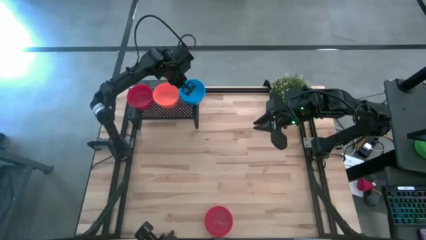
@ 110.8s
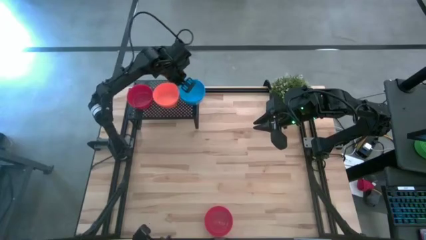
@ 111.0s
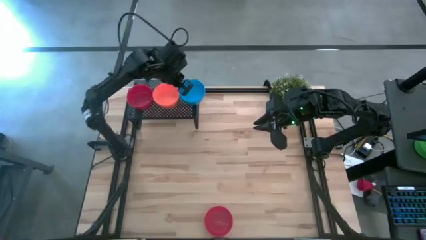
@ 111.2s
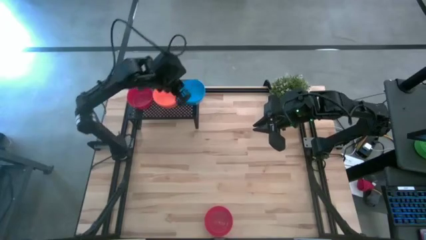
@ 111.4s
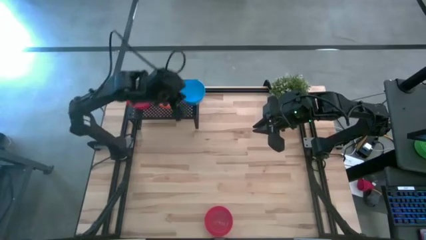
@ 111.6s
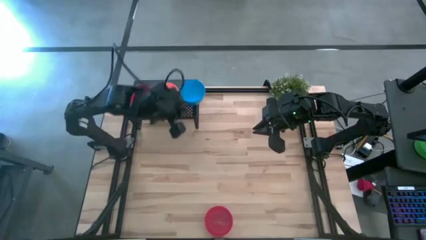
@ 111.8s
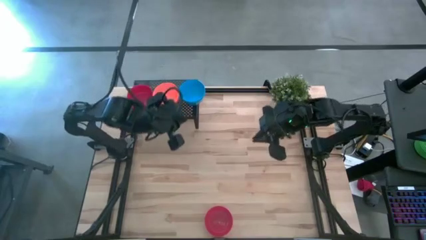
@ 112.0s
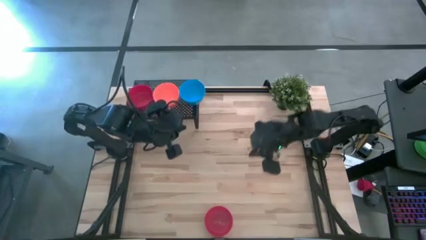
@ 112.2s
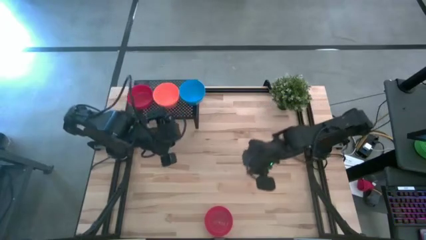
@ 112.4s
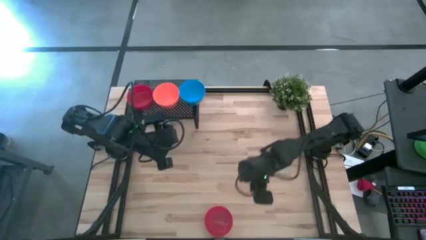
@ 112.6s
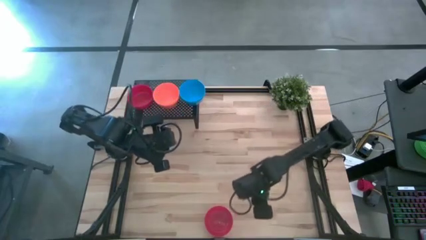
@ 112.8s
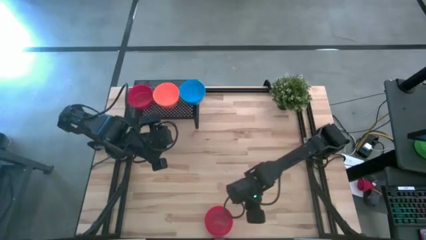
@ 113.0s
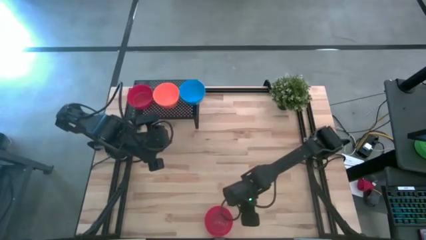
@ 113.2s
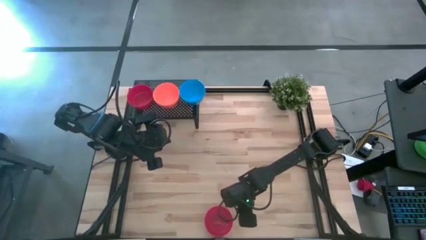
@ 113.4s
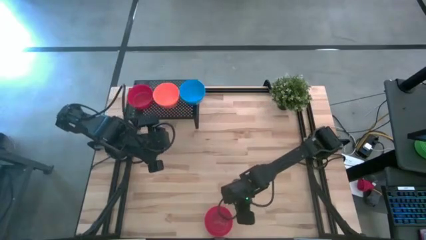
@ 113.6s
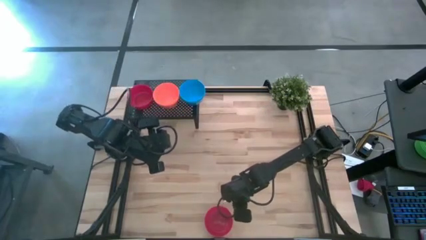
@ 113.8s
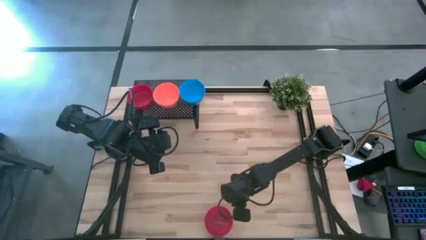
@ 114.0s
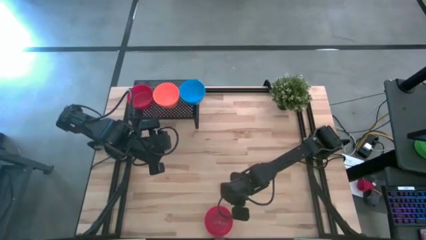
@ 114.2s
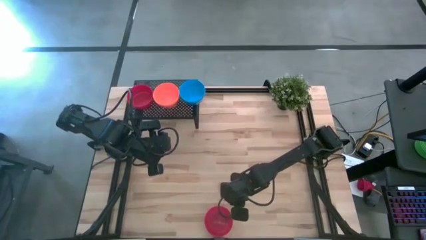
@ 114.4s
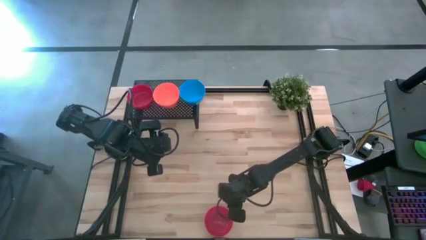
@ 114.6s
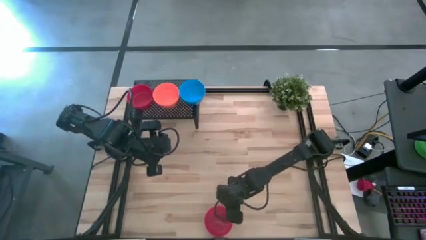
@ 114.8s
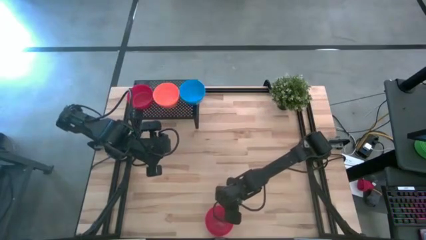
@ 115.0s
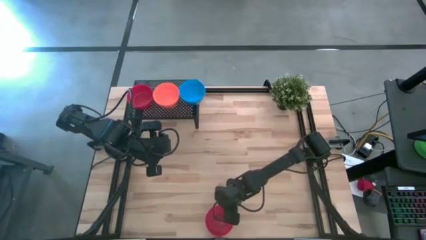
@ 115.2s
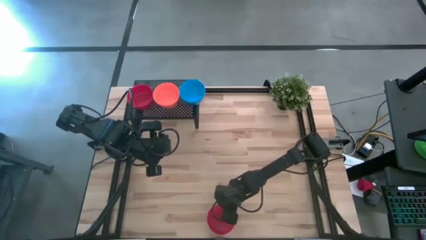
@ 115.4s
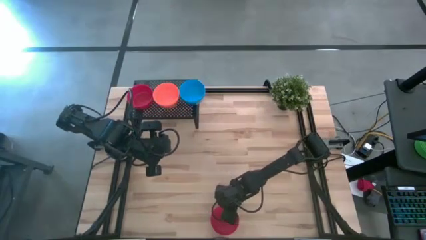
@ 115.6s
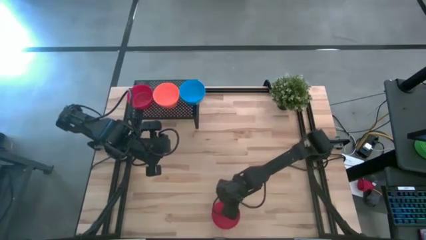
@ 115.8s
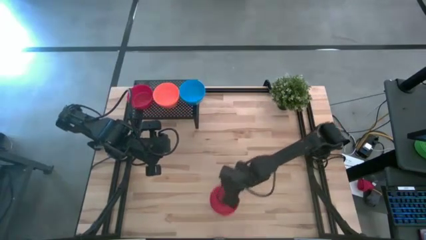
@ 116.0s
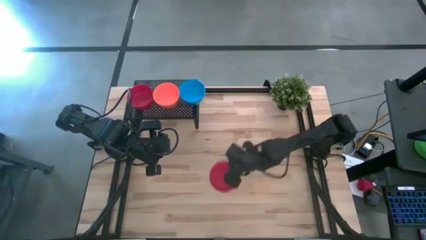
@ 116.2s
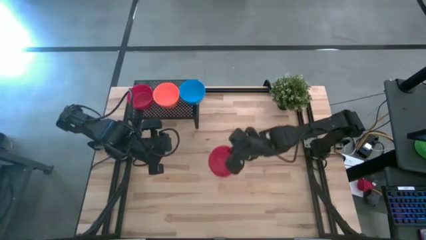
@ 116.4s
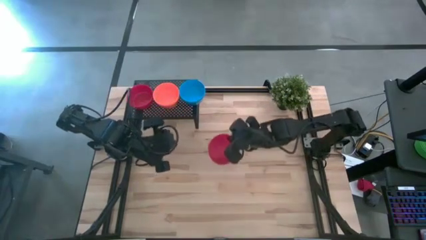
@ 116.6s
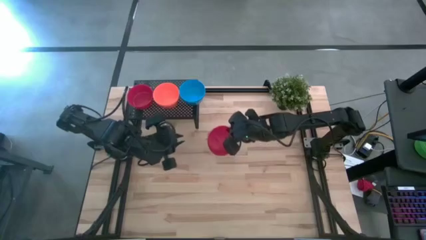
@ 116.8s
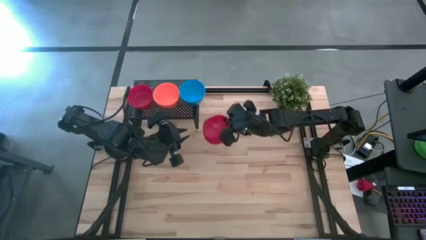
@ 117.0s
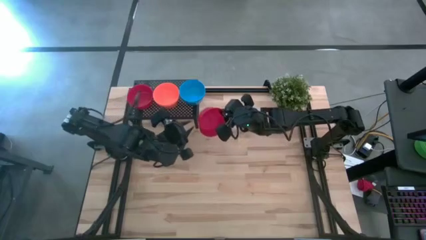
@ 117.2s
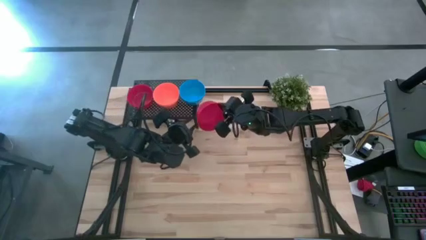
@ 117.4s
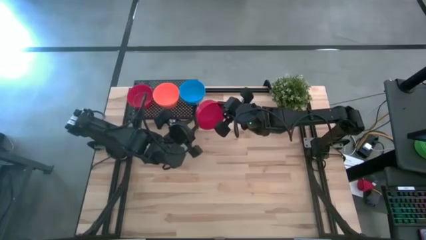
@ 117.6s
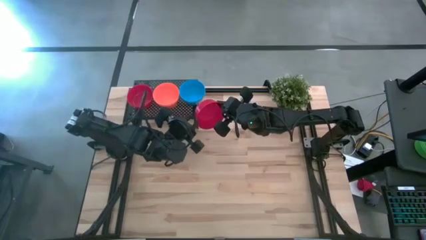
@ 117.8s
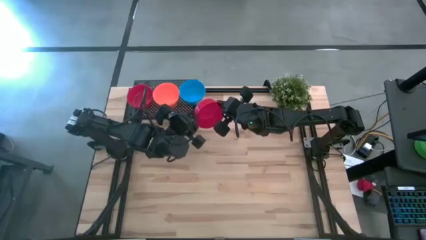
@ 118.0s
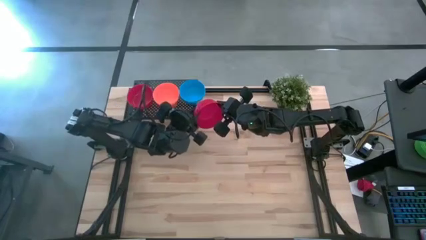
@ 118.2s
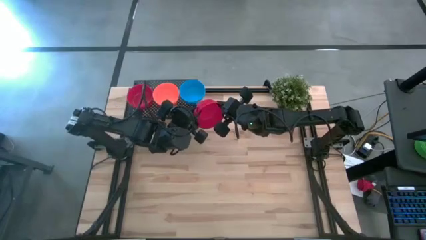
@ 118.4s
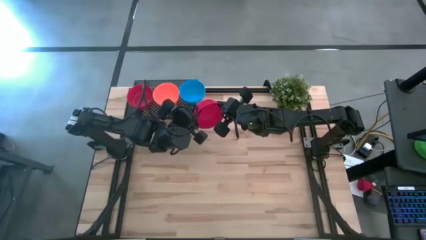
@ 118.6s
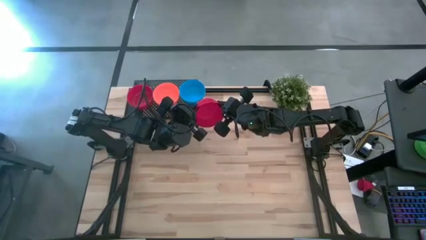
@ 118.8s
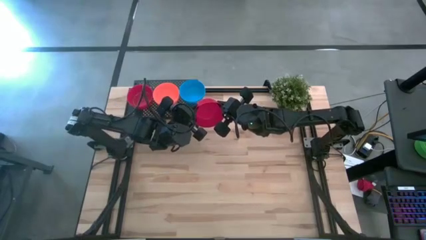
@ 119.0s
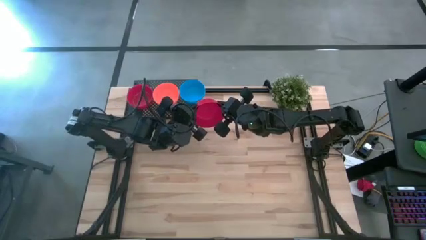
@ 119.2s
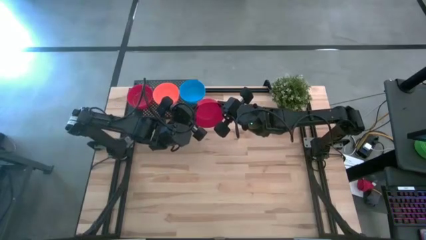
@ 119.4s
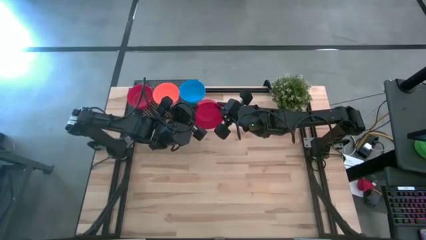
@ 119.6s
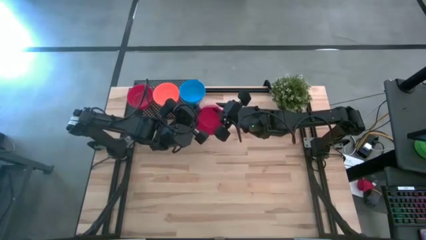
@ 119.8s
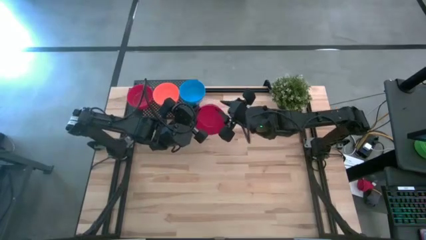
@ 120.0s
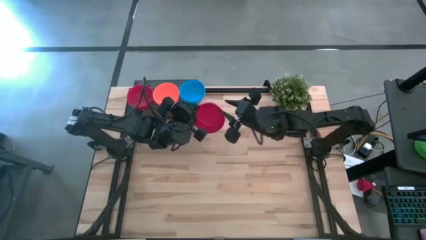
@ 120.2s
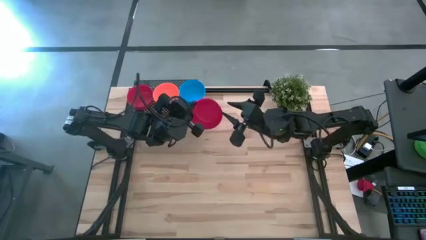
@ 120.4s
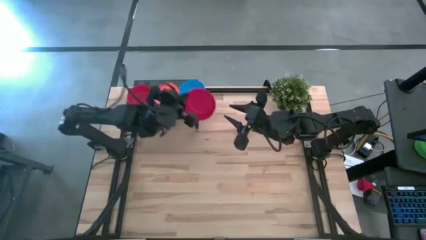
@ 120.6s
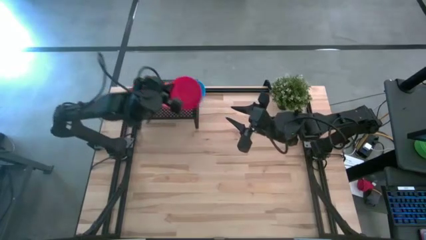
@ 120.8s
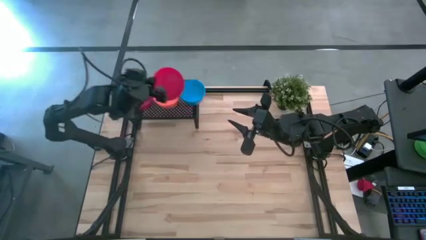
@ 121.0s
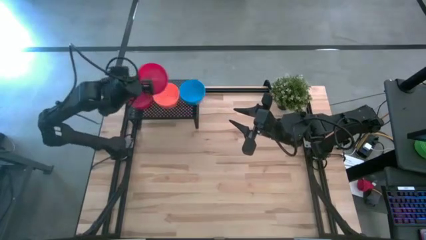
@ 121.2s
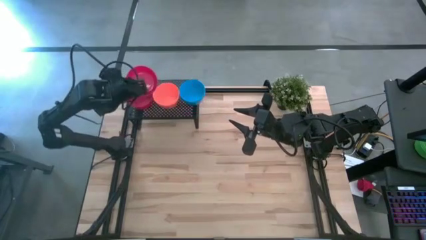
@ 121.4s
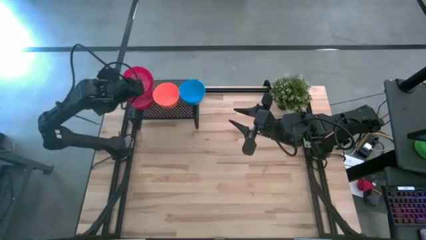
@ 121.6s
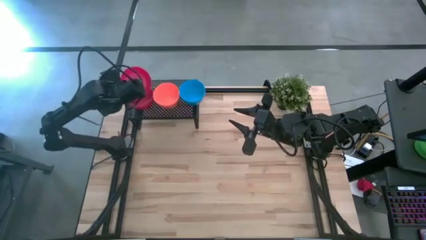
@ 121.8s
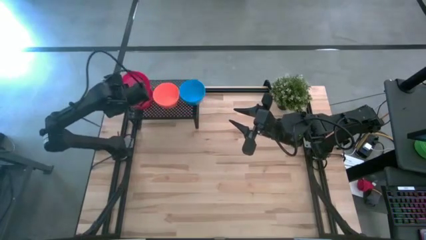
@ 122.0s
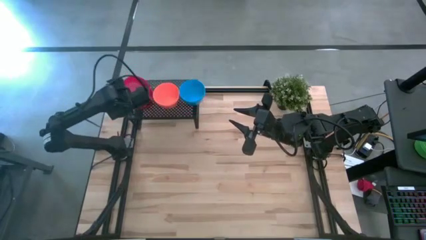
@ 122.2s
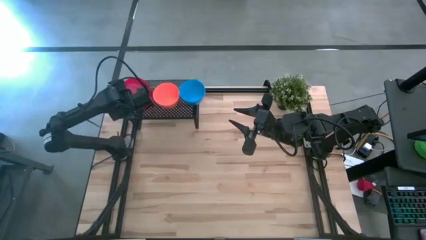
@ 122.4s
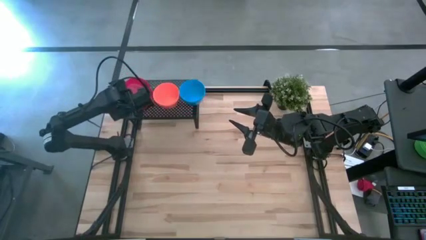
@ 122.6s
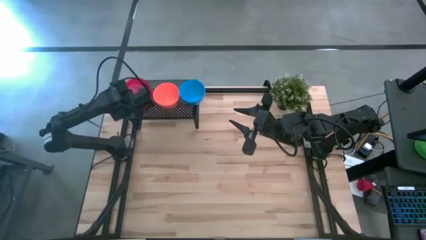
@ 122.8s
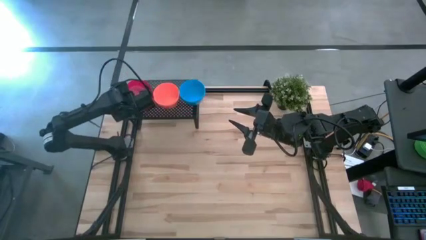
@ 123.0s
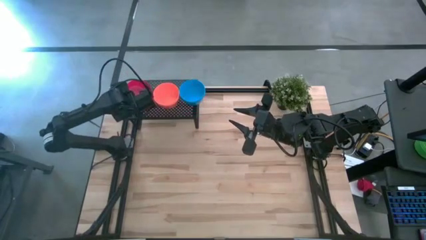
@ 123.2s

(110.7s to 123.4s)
Task: Pick & Place Mini bowls
Stack the red bowl on top of the red bowls on the shelf

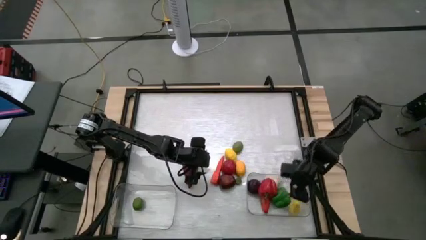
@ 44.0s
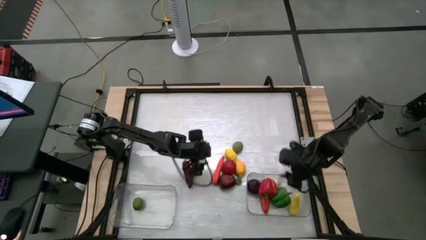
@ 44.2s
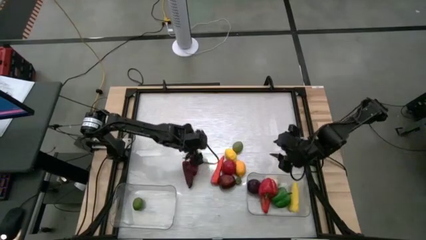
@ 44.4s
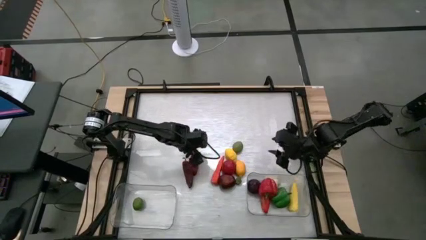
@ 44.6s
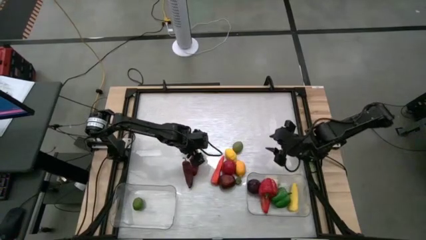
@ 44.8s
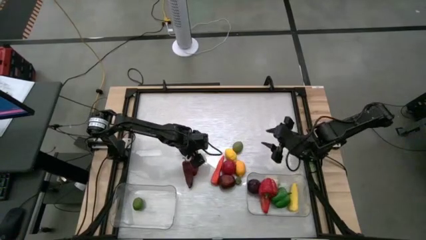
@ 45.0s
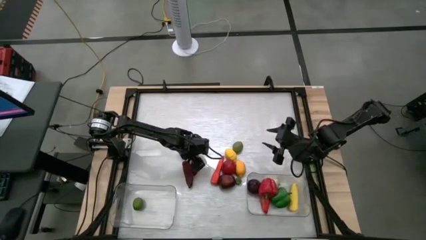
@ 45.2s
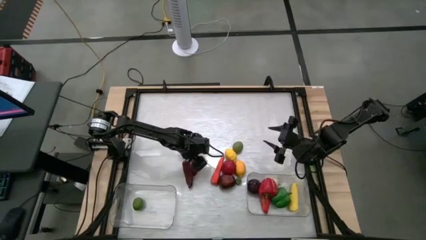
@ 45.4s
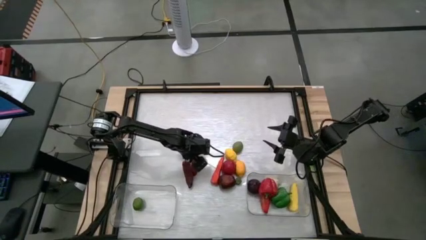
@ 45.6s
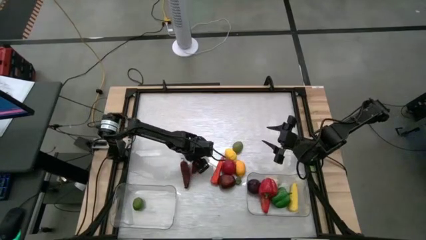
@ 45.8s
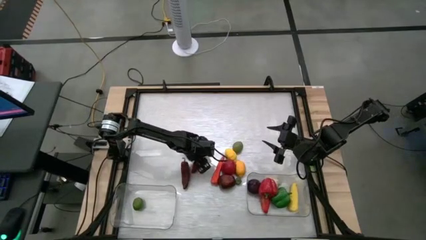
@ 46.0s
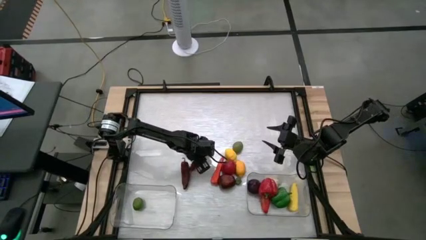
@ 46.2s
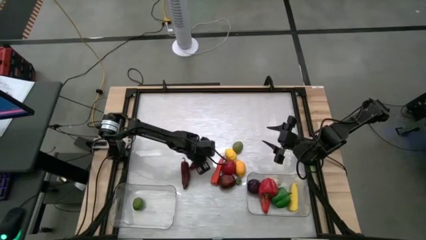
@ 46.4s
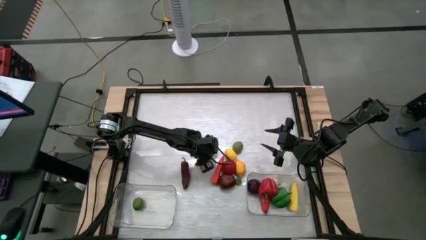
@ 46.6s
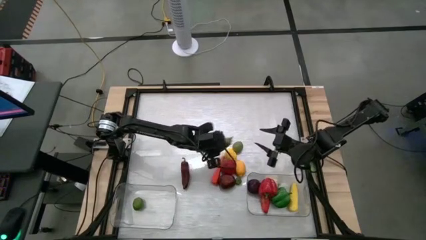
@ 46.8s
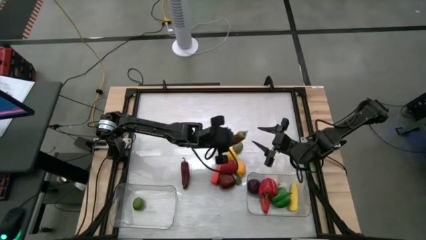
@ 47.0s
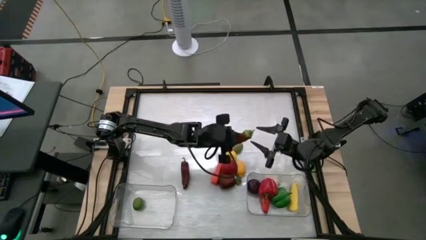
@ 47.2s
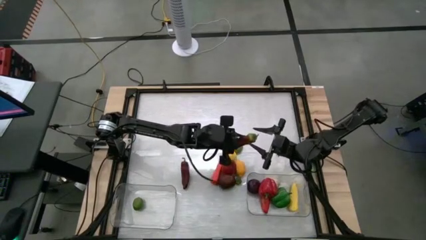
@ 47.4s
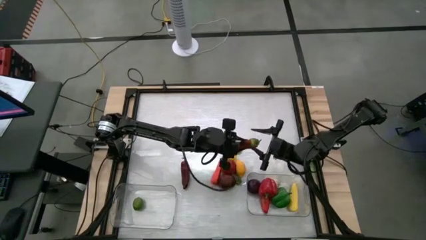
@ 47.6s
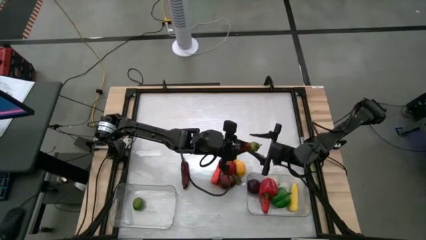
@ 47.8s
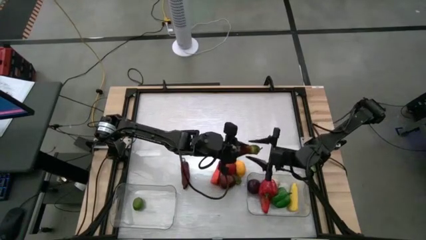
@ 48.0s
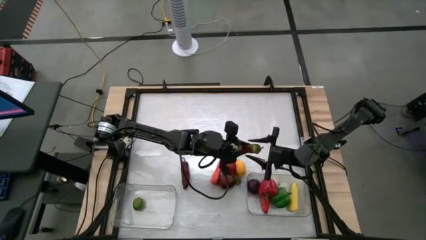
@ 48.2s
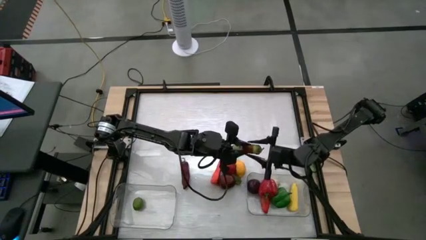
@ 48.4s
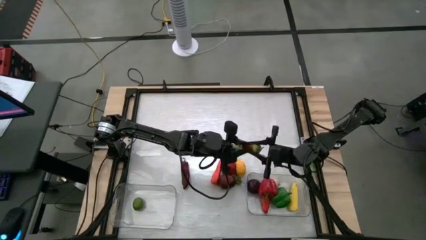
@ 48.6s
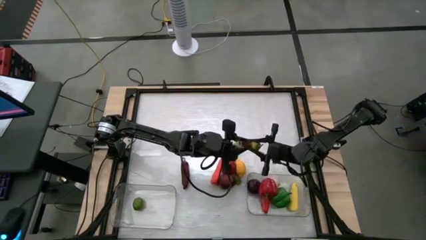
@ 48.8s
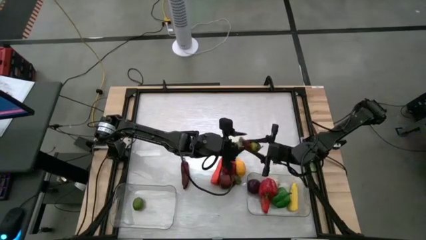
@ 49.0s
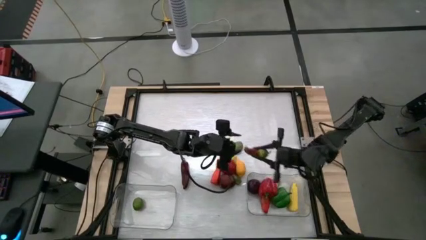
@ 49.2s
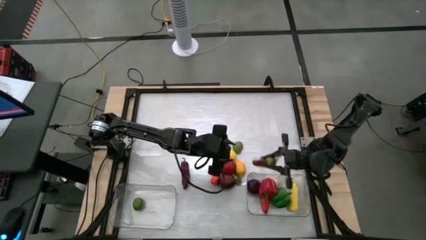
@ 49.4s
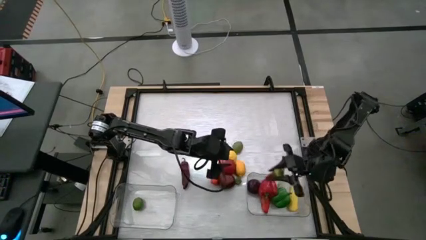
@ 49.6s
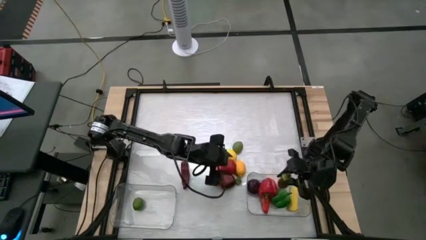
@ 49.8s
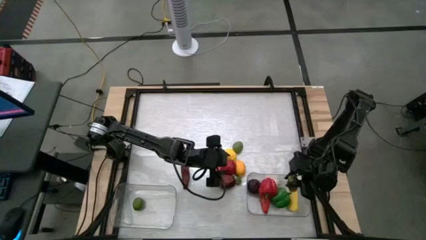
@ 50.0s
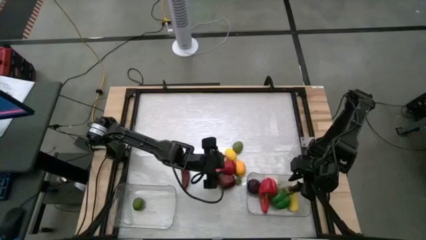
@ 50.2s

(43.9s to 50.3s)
Task: Sort produce into baskets
Put the red pepper into the right transparent bin
